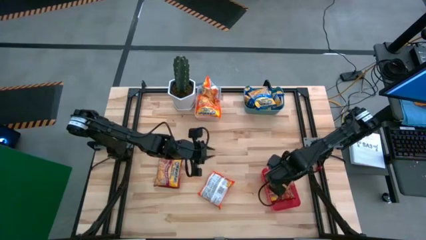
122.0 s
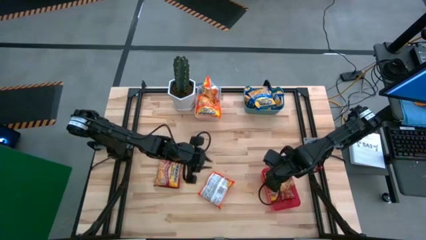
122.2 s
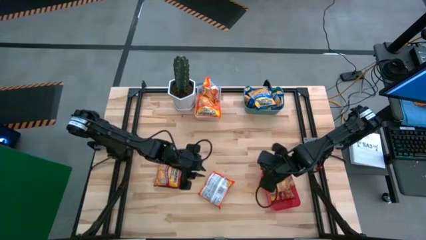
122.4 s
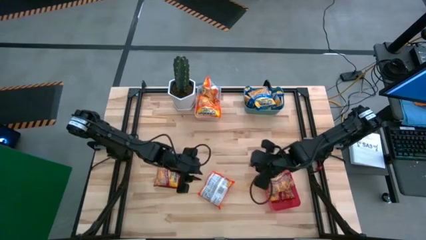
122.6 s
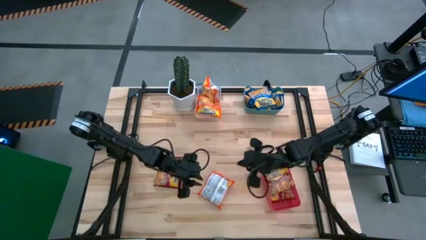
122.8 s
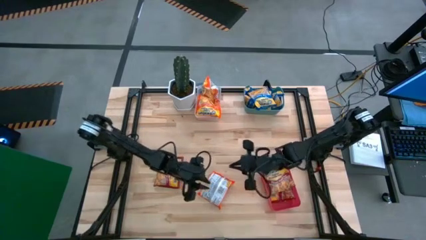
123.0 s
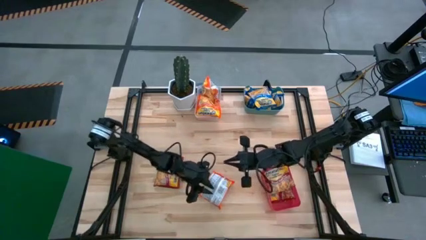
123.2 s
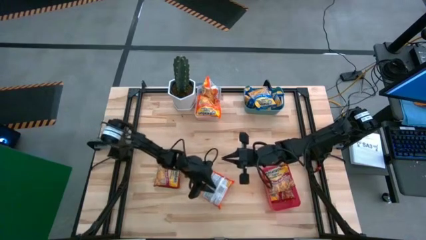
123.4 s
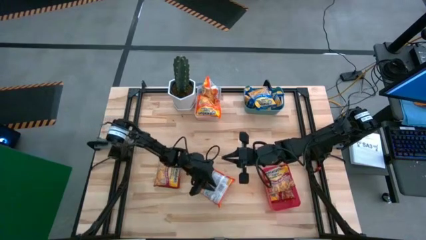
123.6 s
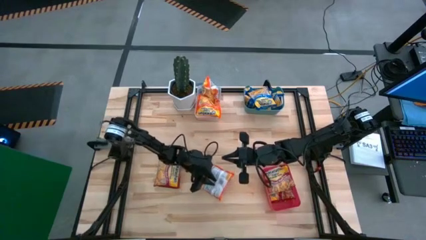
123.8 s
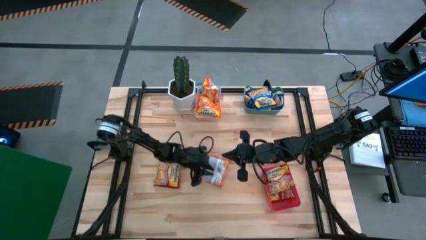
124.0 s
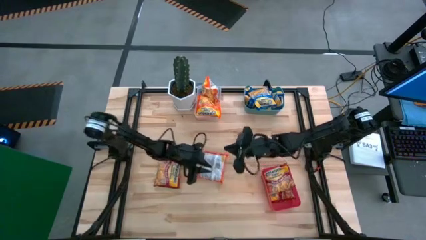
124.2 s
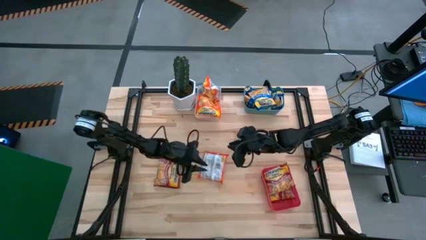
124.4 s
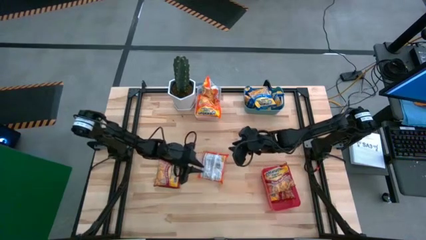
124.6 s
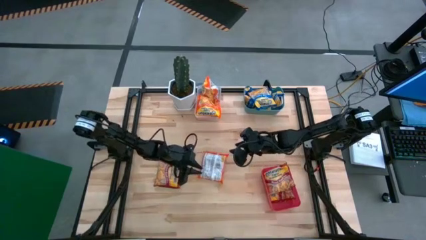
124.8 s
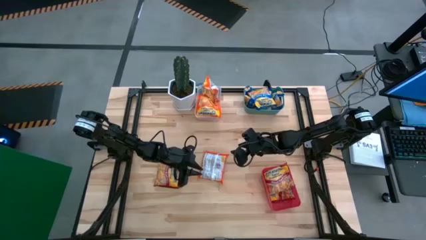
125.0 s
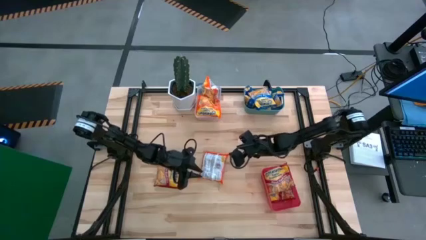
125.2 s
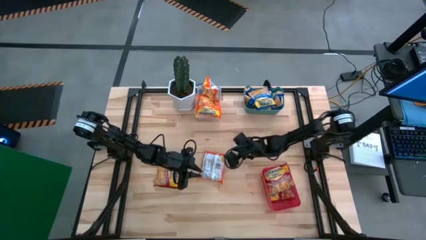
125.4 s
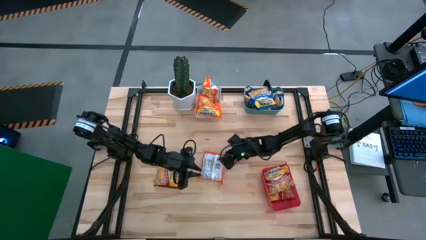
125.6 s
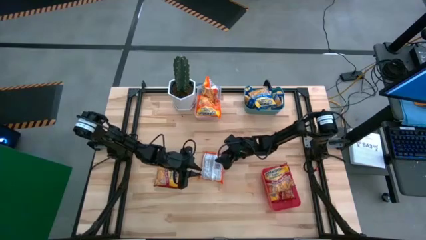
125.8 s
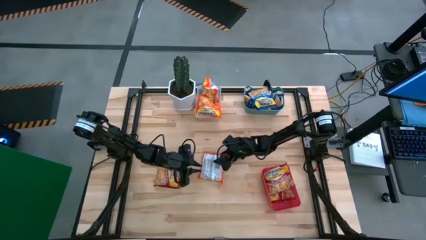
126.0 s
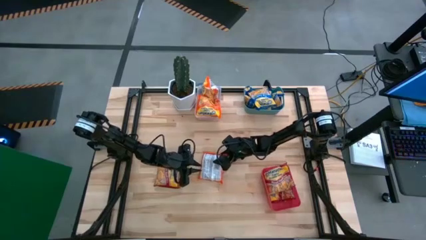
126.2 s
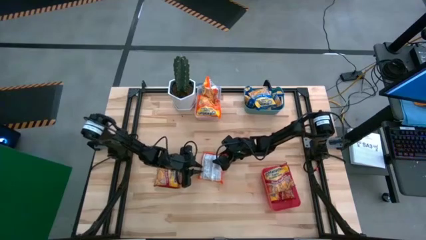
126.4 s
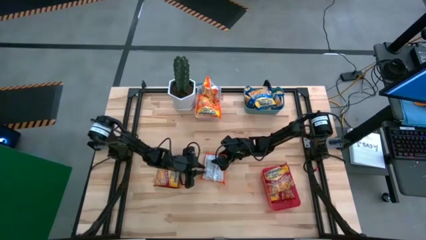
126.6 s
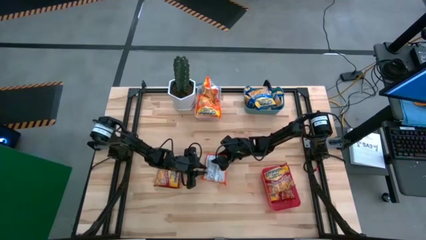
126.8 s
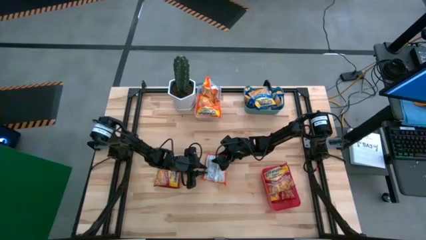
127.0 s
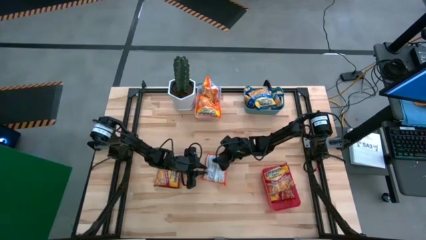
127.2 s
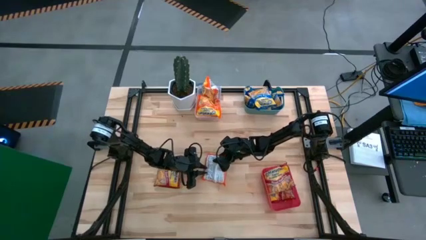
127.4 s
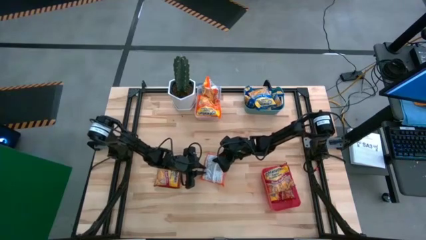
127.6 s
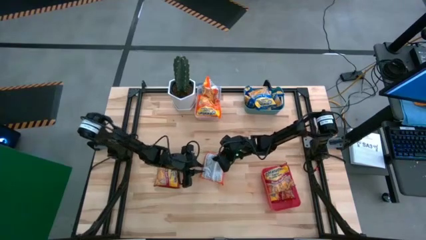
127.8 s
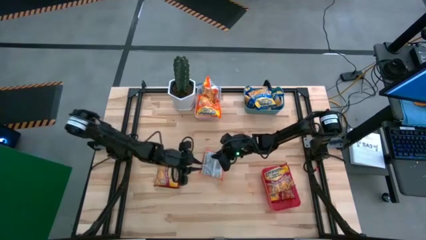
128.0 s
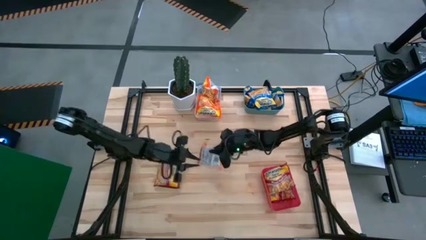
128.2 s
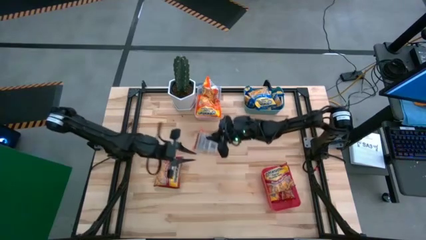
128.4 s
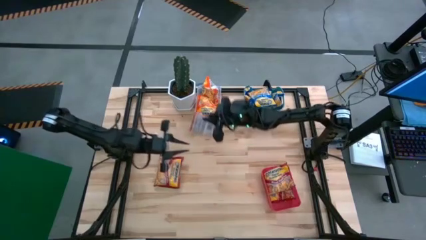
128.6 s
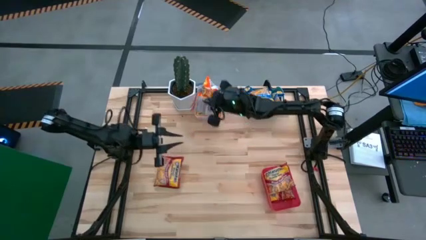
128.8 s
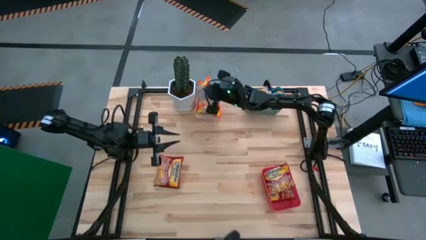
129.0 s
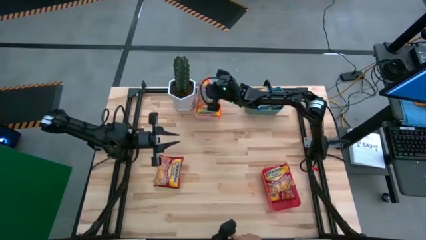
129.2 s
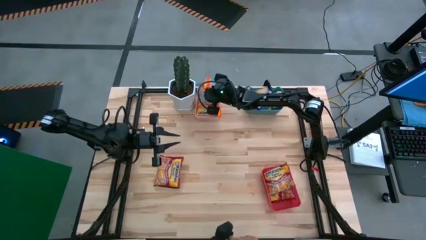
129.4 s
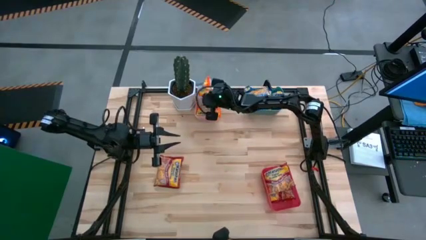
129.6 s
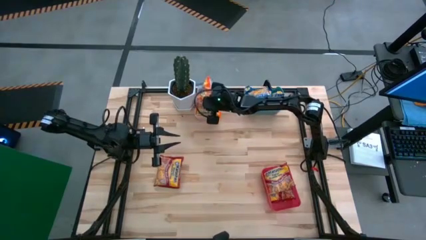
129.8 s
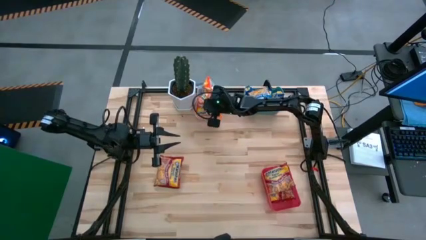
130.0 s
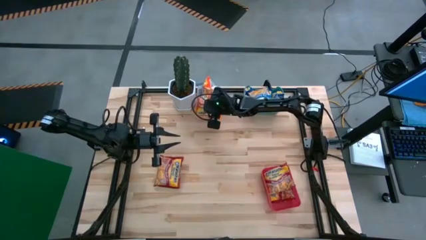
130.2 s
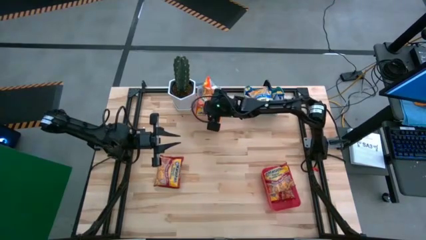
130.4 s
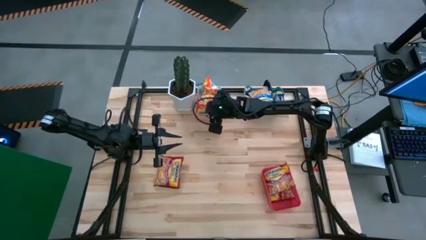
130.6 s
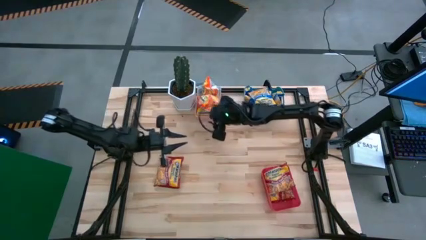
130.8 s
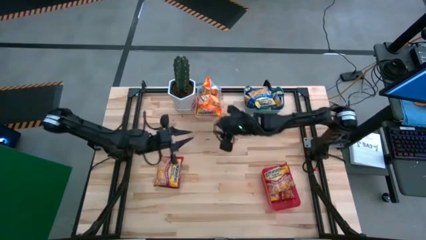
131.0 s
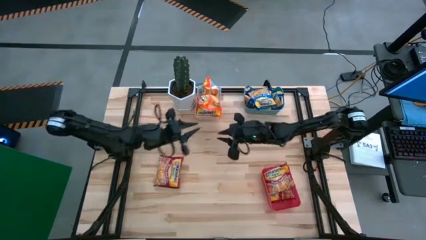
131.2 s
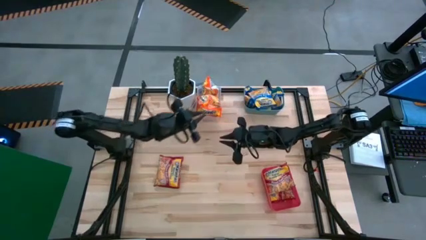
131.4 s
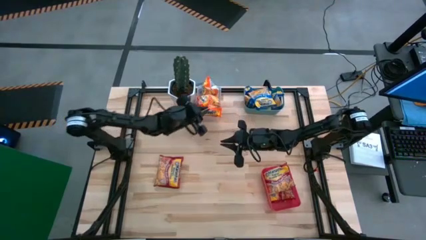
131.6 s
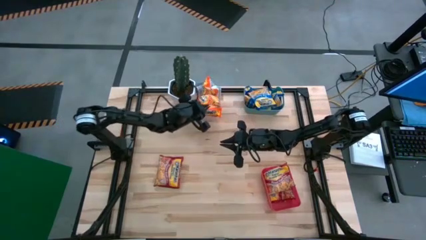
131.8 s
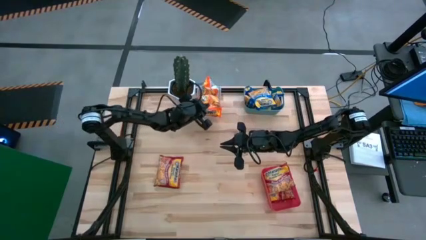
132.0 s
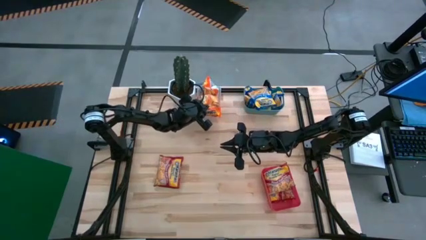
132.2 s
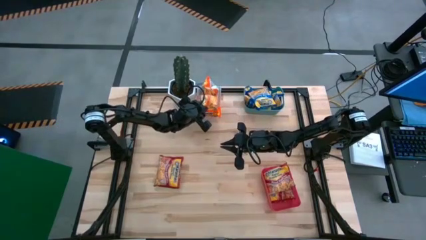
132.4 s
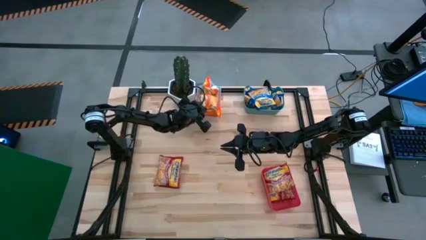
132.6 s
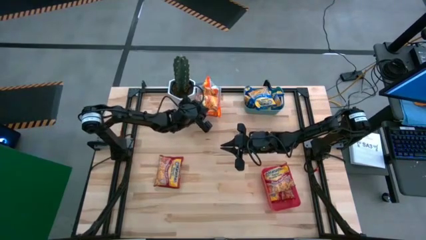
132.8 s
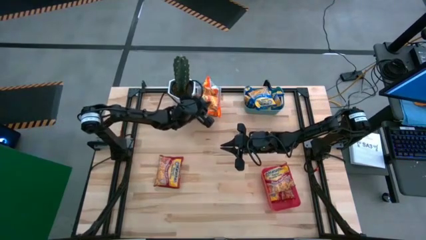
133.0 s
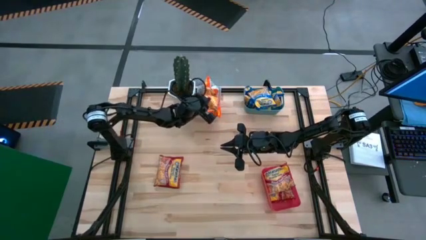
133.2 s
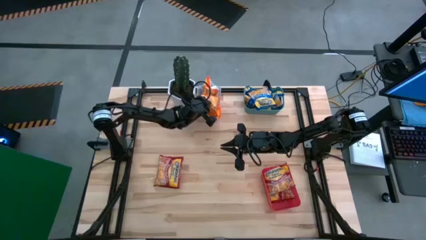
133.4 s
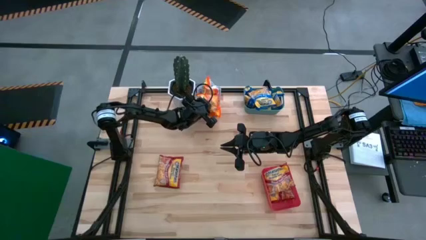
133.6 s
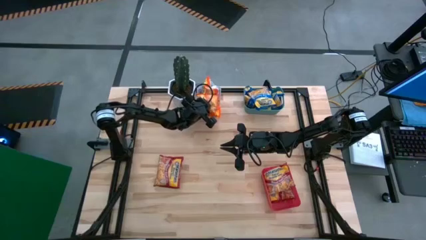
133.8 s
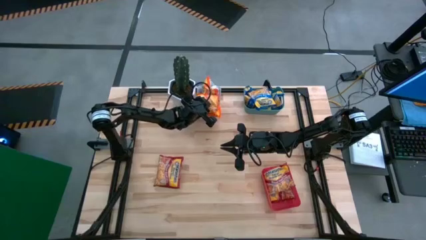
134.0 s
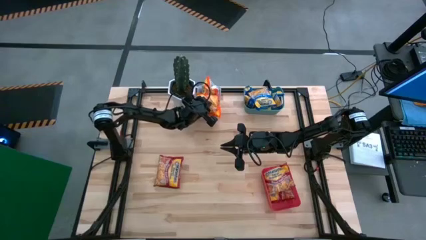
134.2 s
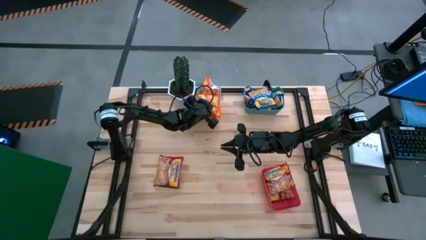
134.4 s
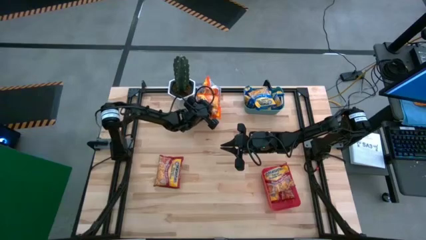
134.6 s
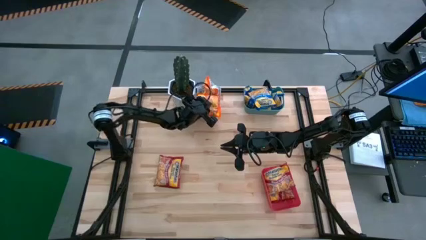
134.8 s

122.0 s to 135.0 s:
Task: Sort Maruchan noodles
Put the orange noodle pack into the transparent bin
